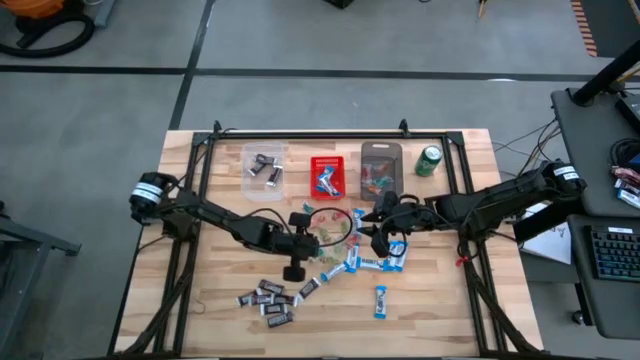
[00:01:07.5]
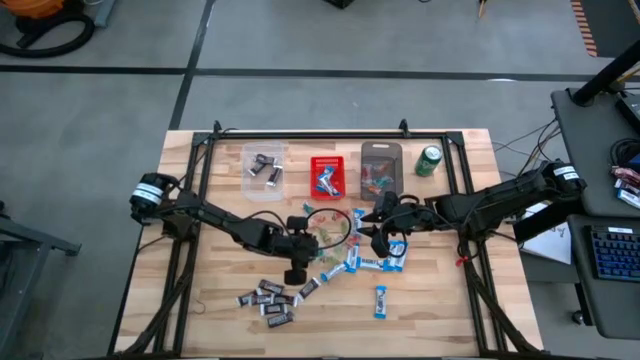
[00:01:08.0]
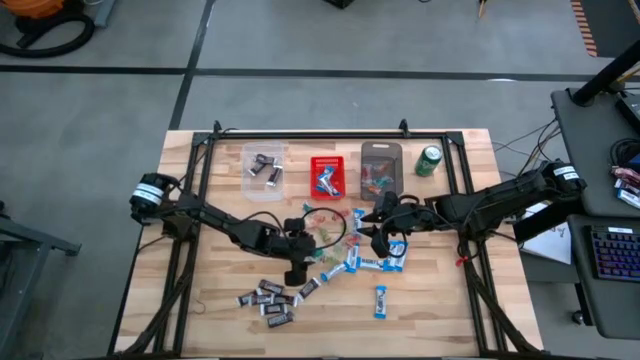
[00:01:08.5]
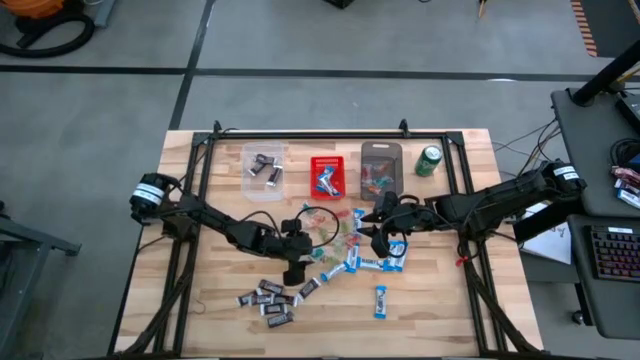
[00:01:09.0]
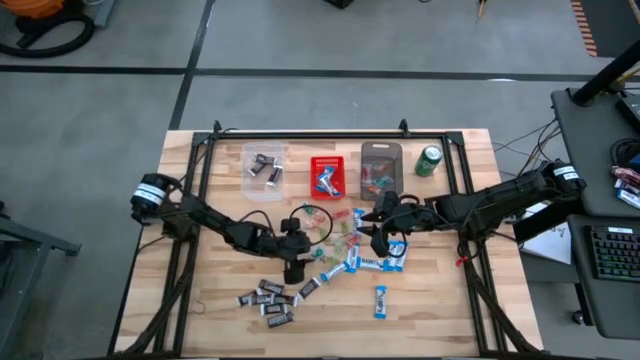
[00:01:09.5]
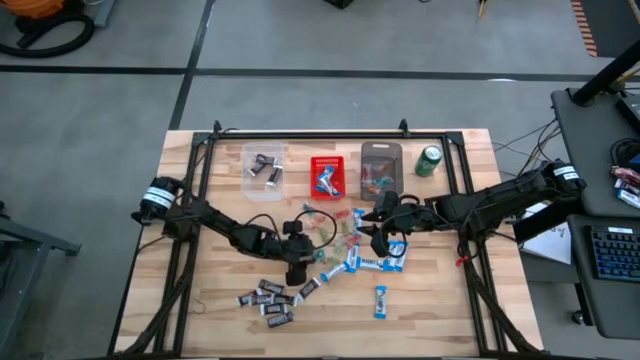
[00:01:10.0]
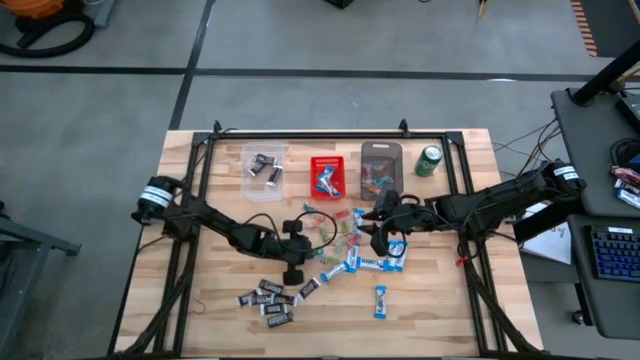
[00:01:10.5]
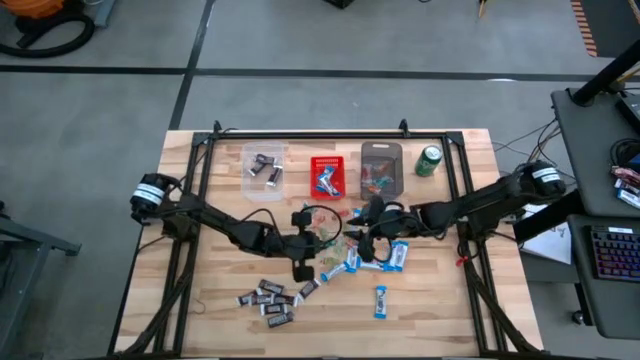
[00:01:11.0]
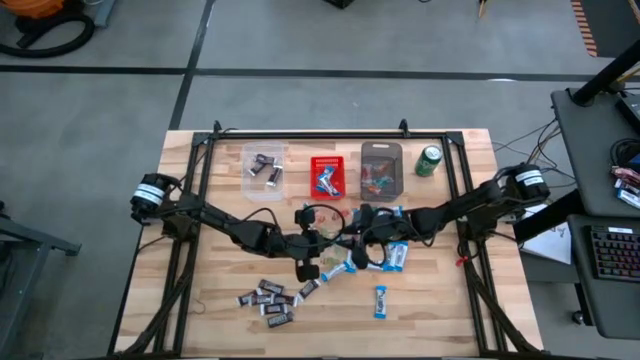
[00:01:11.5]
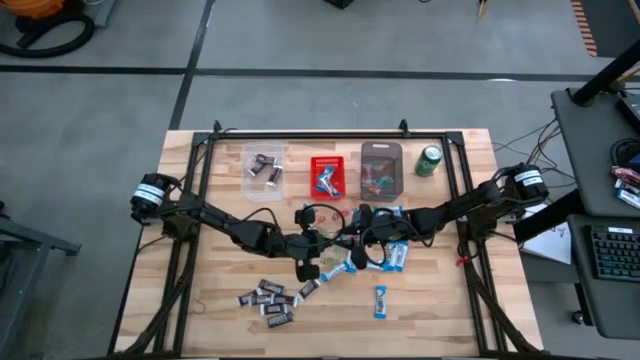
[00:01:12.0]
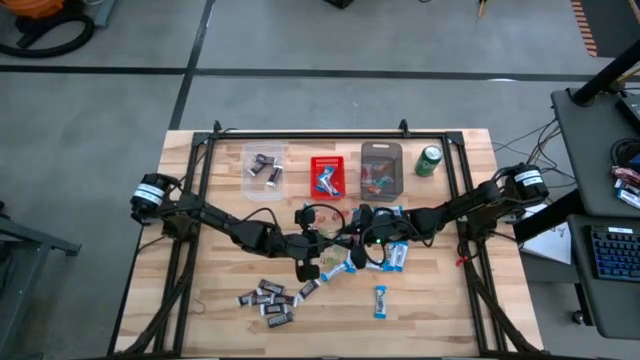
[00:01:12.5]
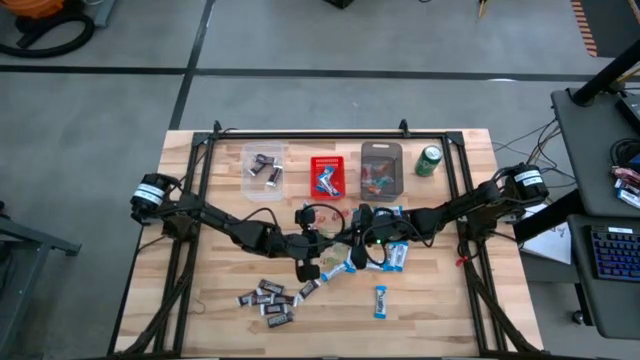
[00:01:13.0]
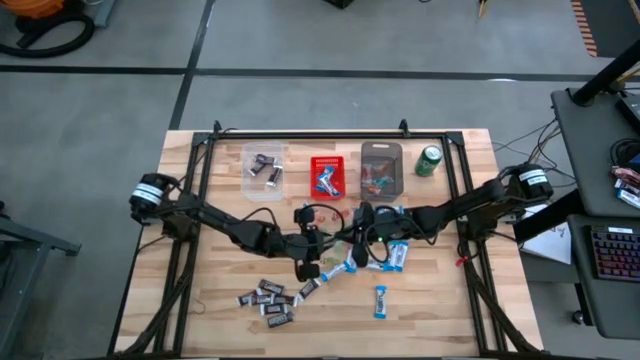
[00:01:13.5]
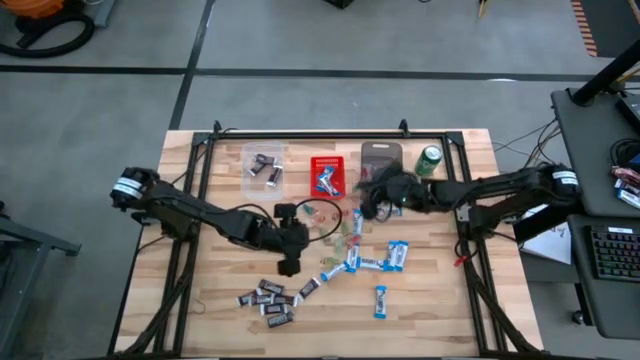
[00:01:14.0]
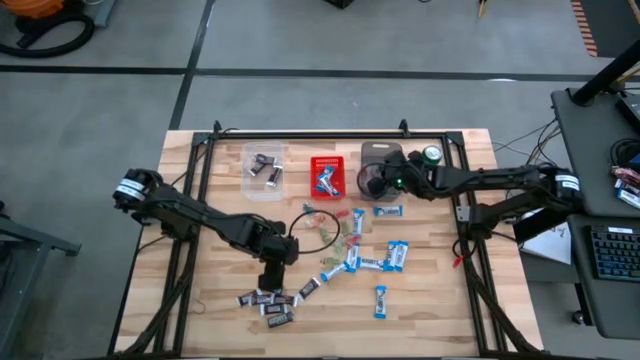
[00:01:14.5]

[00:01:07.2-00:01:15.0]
Task: Sort candy
Put the blue gummy candy into the black bin

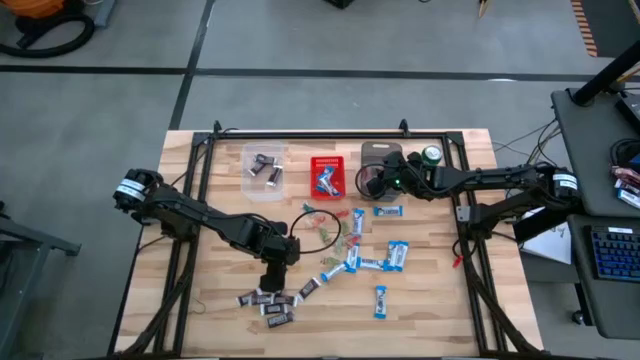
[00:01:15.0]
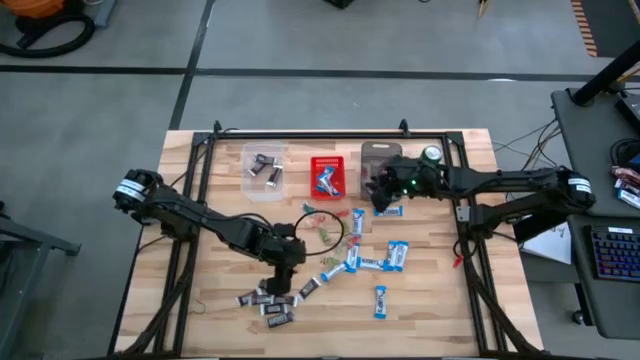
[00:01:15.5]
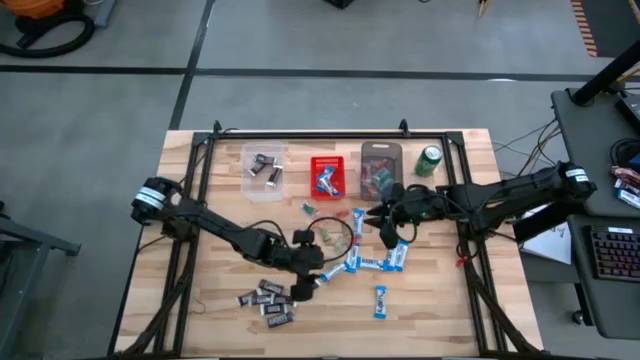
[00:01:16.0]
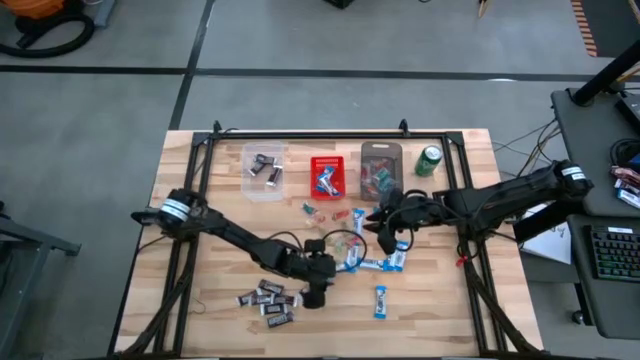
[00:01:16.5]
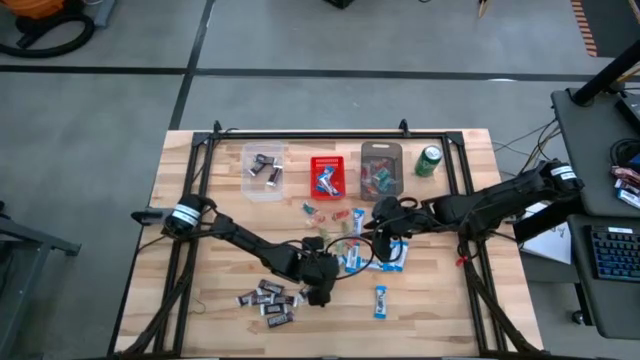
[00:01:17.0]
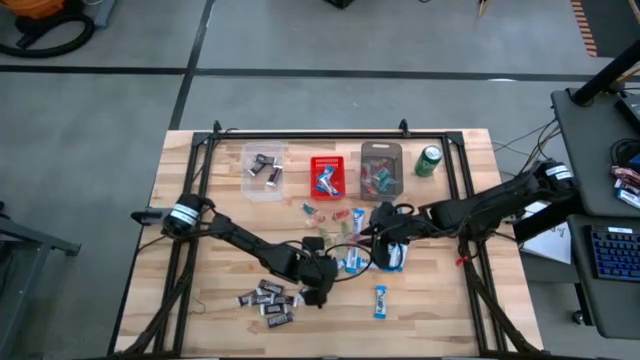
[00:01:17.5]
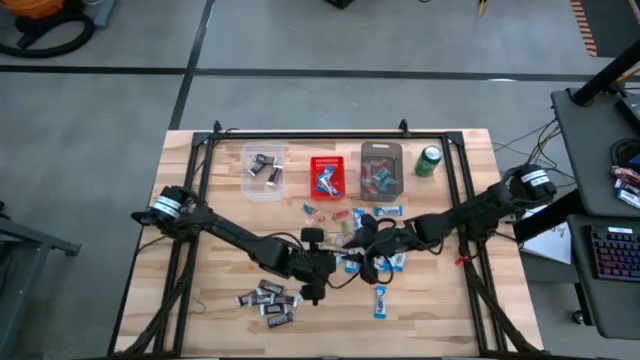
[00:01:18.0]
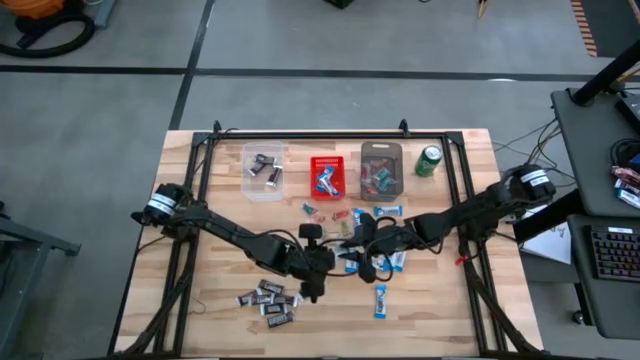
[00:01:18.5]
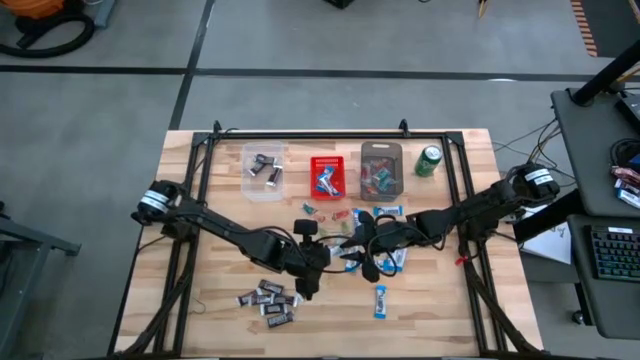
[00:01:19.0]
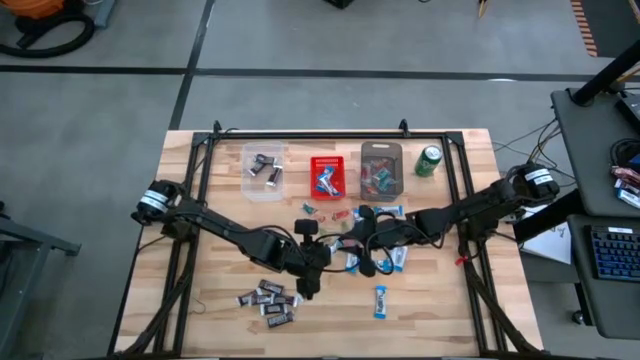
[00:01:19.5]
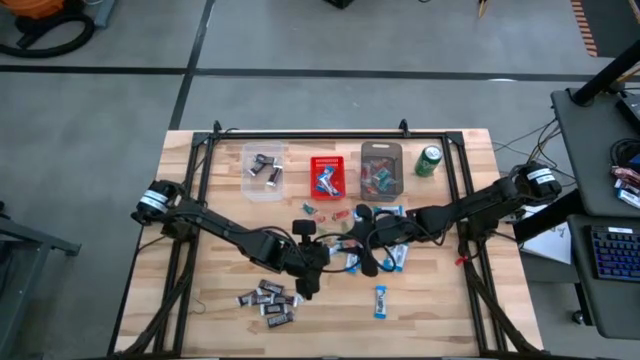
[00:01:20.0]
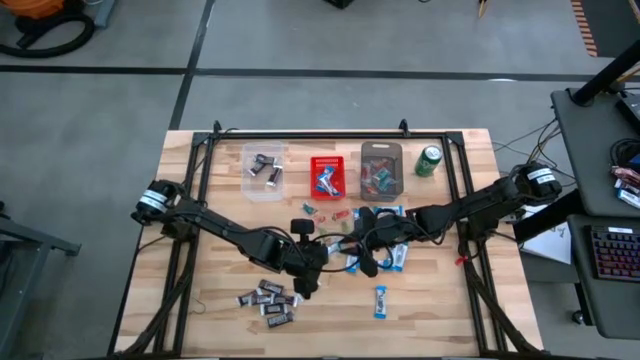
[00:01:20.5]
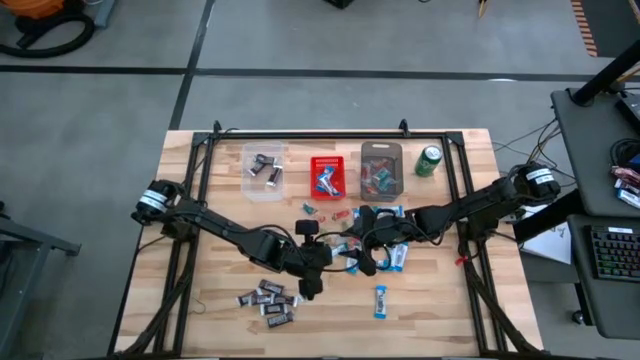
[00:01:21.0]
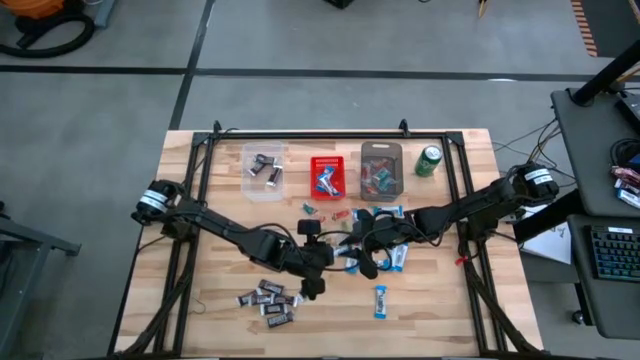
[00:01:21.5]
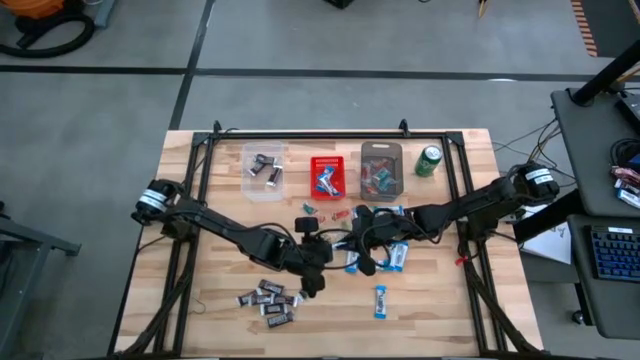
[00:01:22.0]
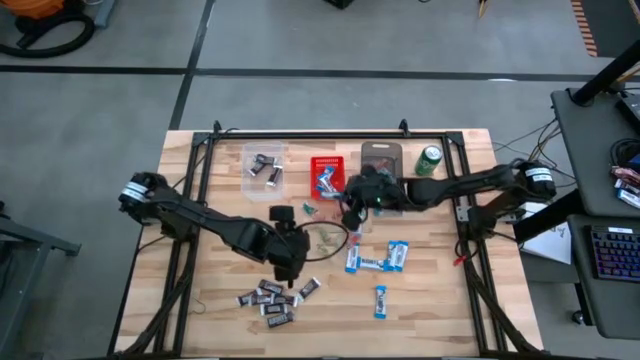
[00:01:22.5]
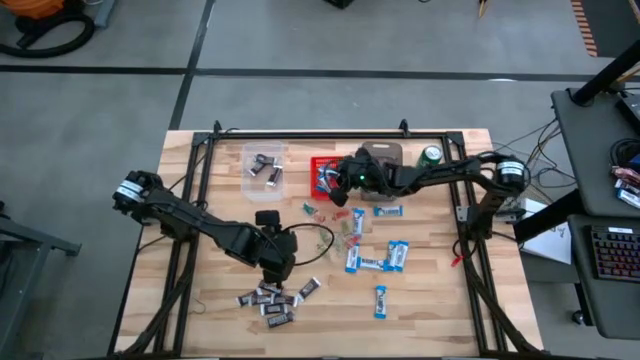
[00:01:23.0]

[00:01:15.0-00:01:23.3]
Put the white chocolate bar into the red bin

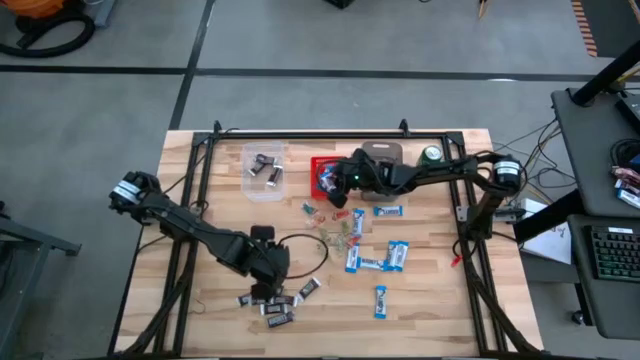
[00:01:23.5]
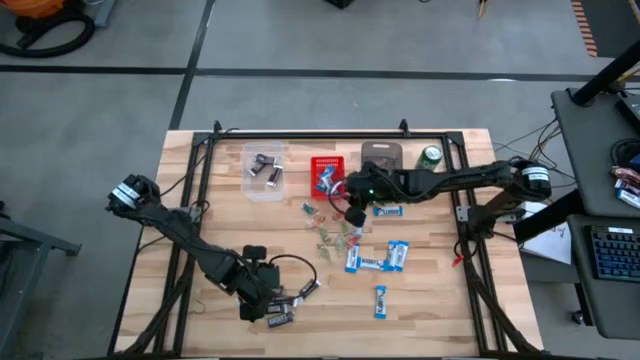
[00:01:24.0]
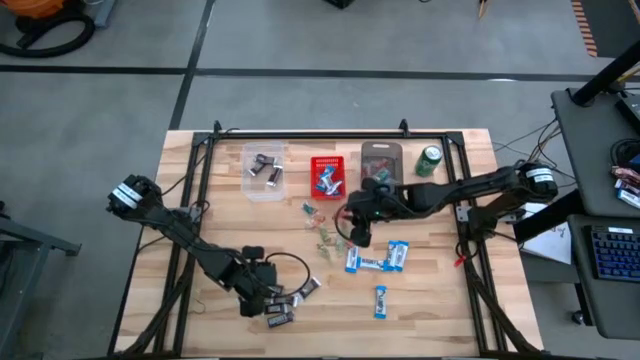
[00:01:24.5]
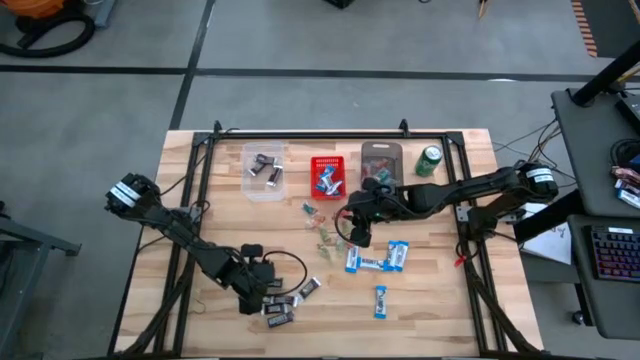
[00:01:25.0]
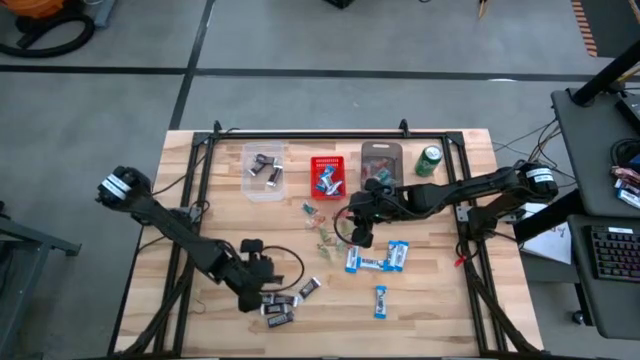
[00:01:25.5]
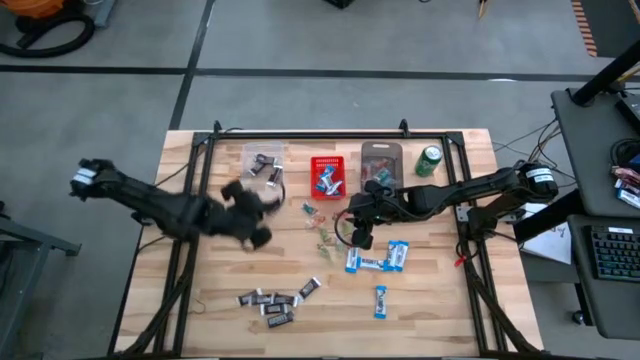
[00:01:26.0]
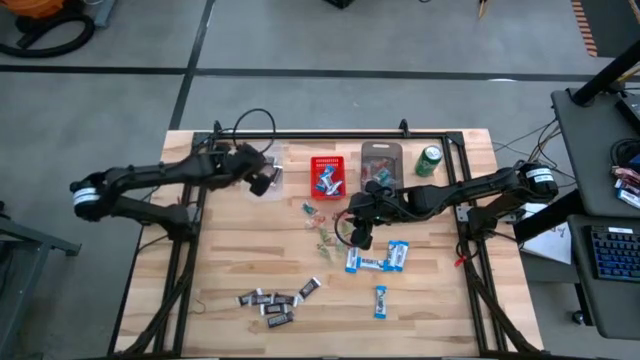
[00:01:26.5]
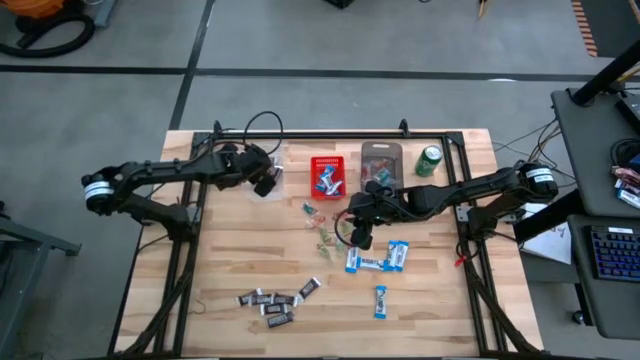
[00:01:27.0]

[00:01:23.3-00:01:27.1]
Put the brown chocolate bar into the transparent bin
